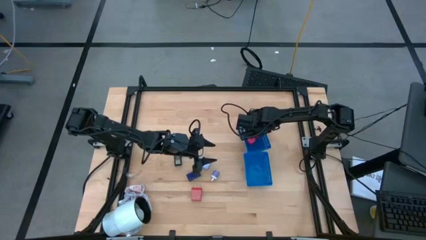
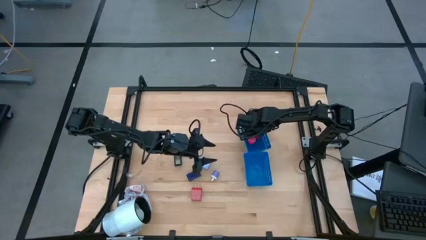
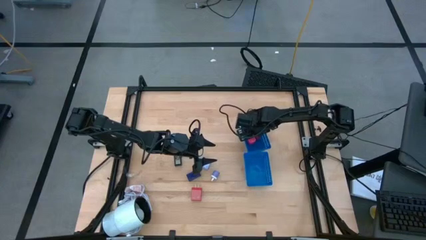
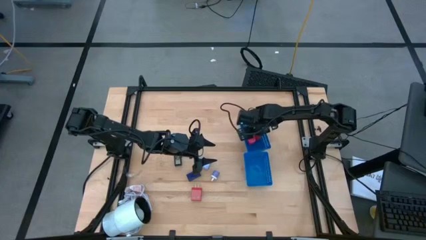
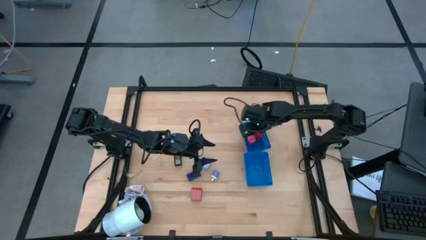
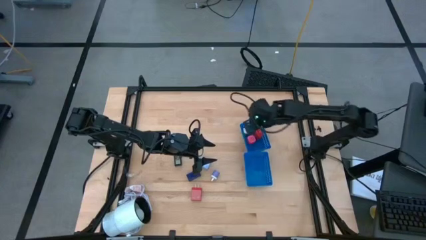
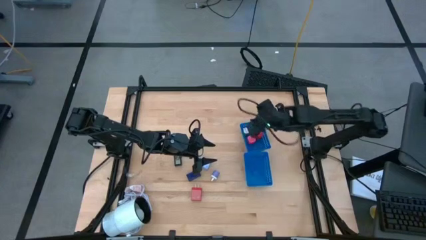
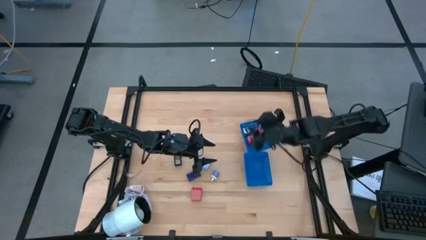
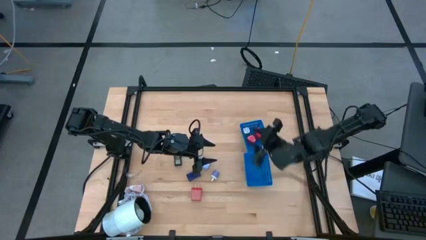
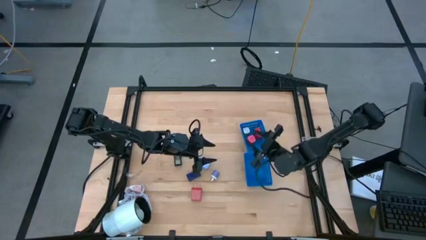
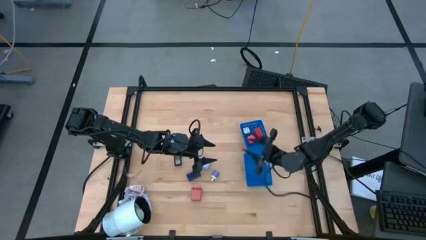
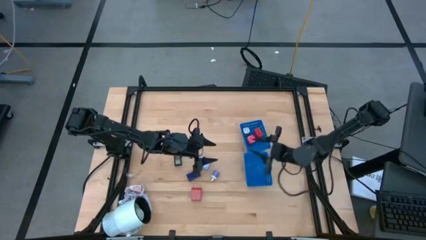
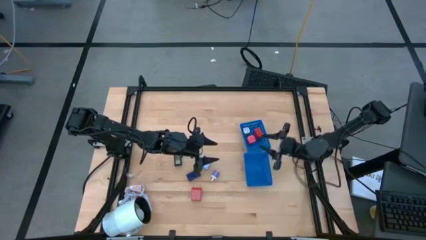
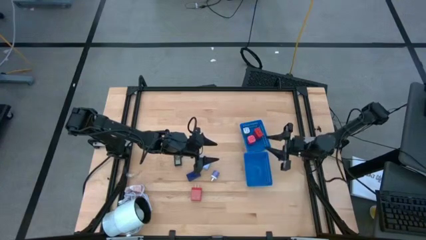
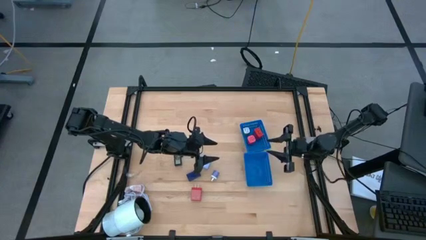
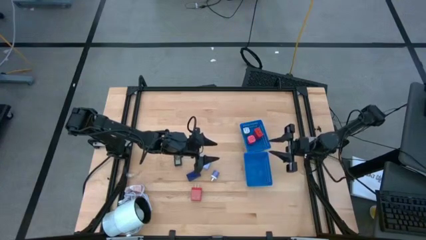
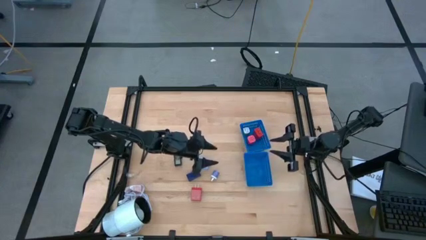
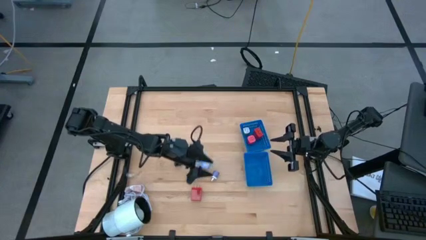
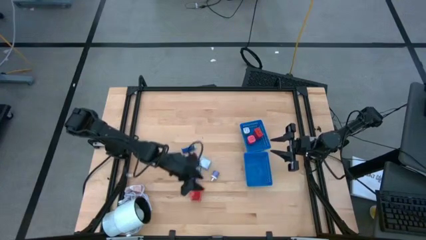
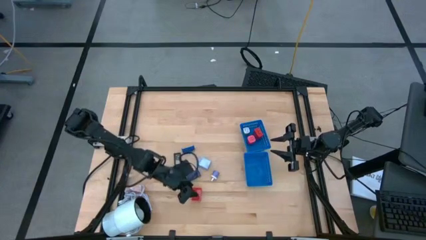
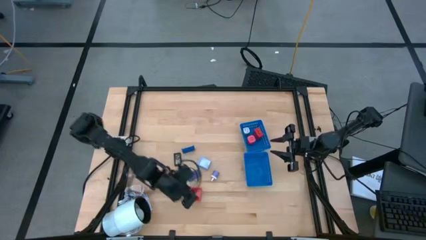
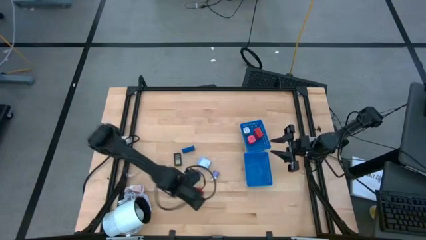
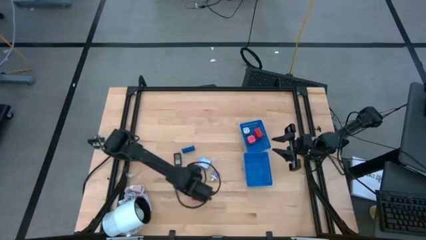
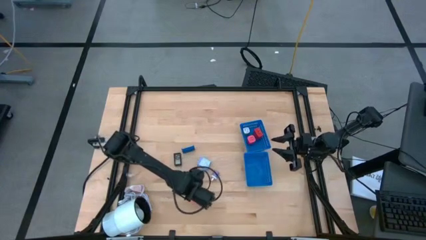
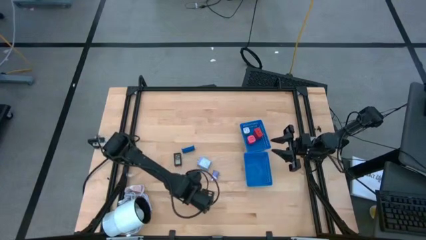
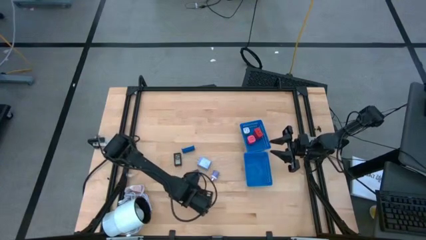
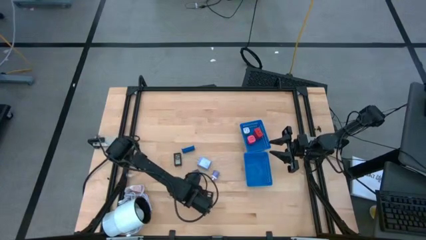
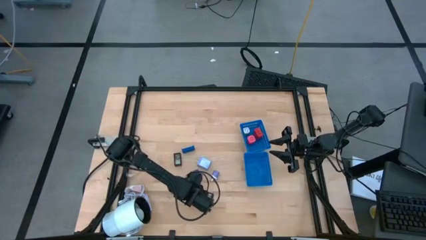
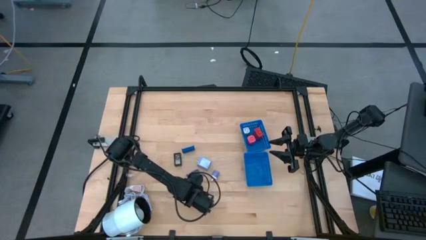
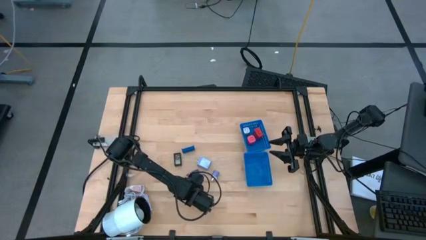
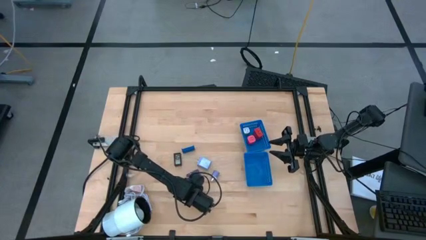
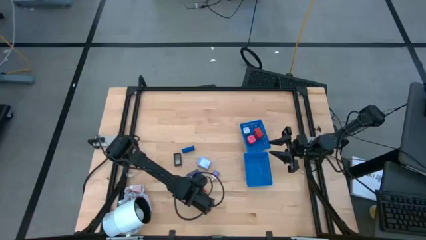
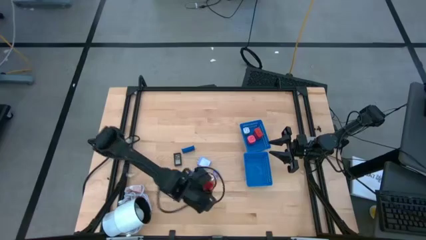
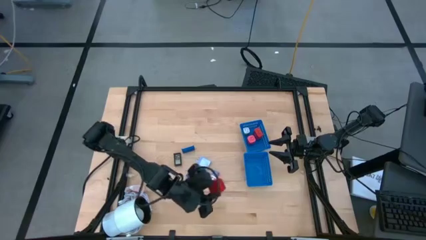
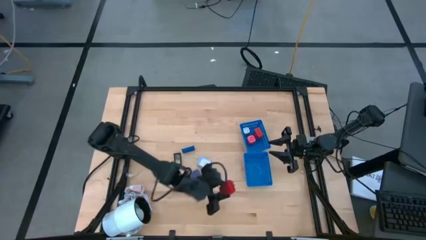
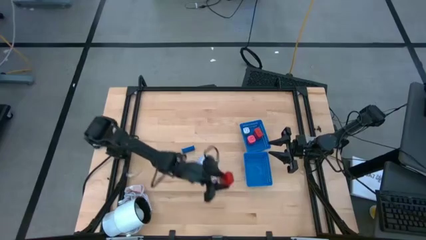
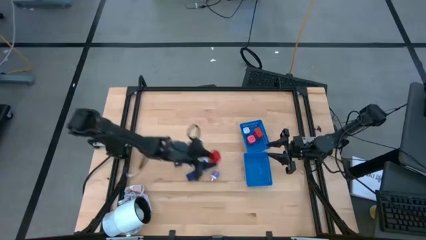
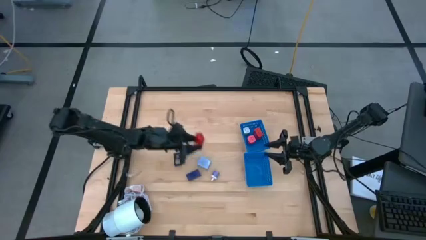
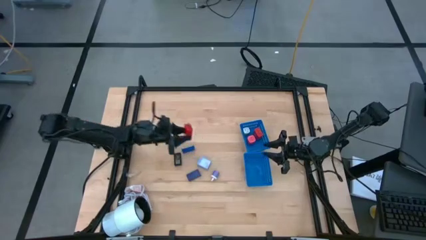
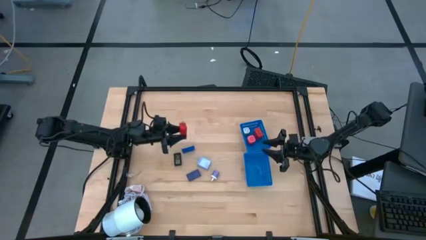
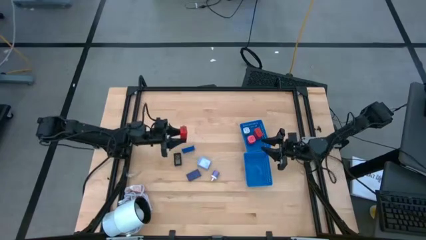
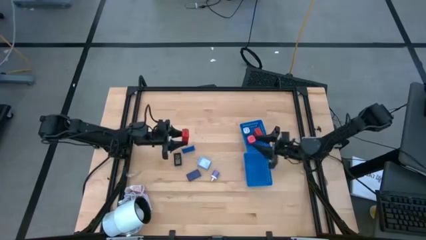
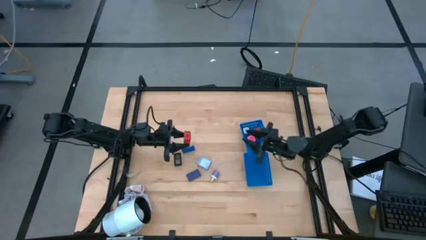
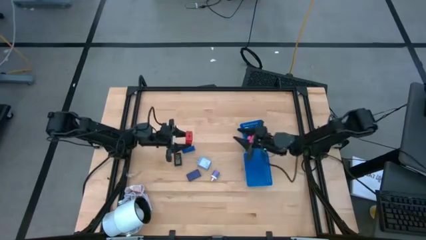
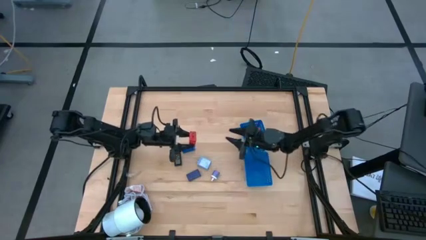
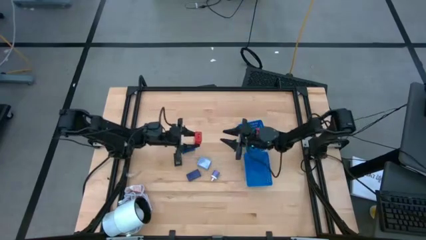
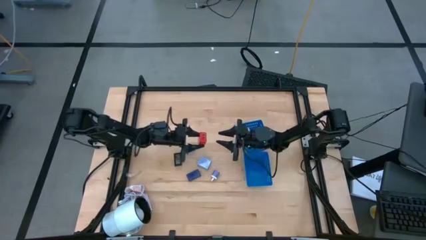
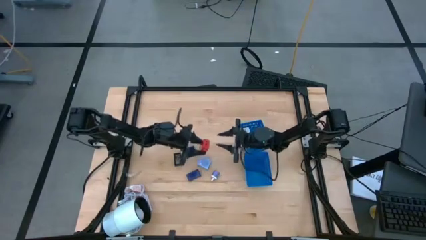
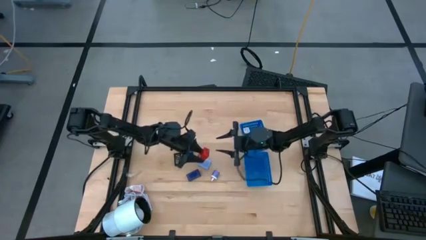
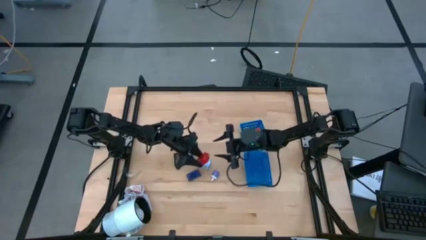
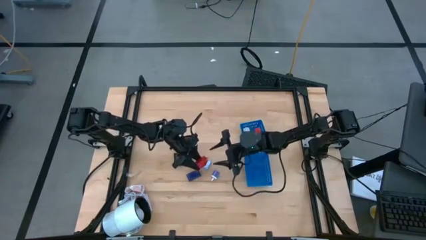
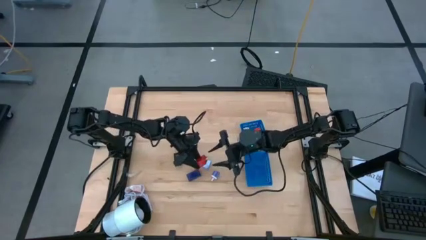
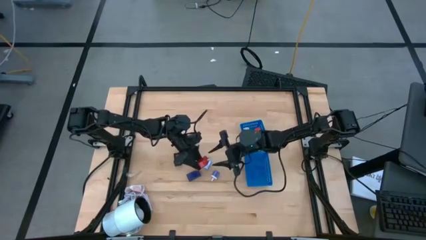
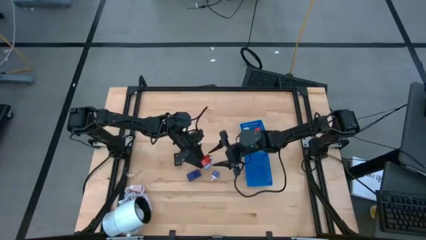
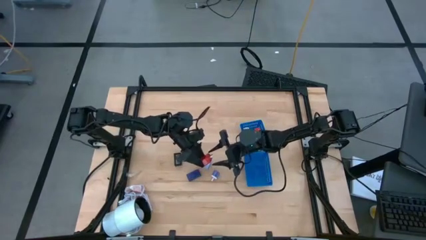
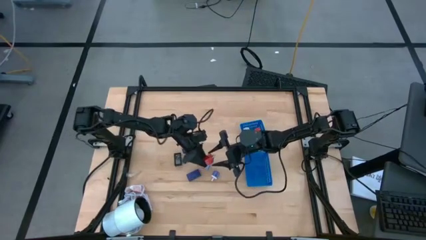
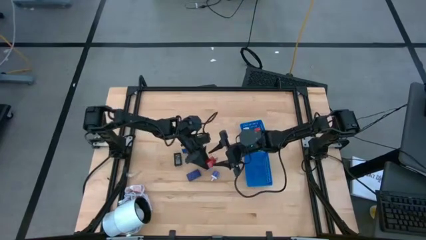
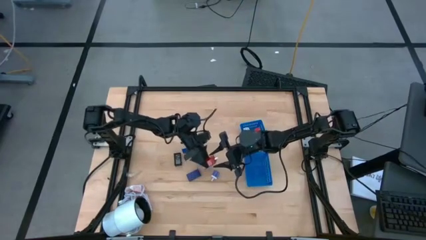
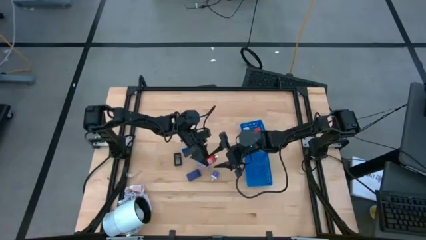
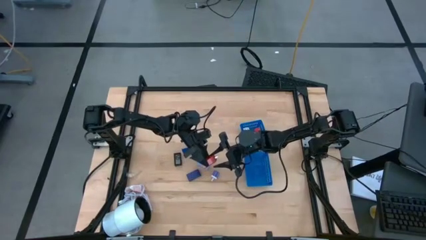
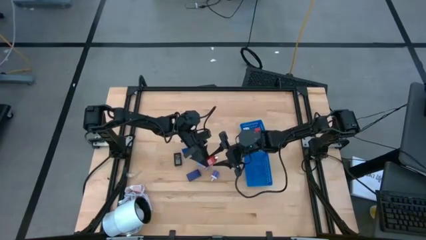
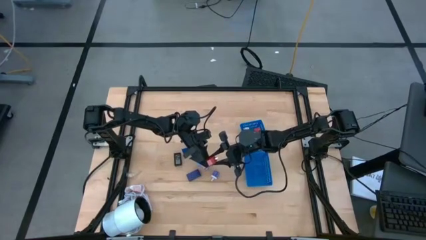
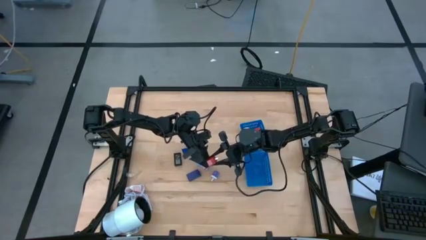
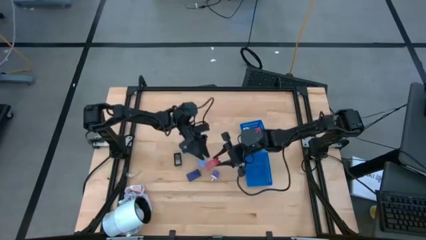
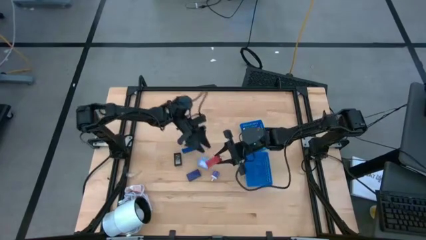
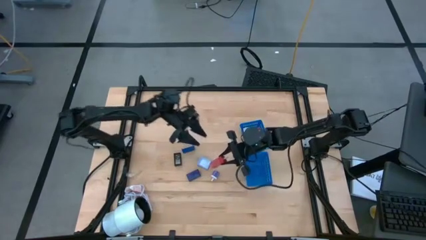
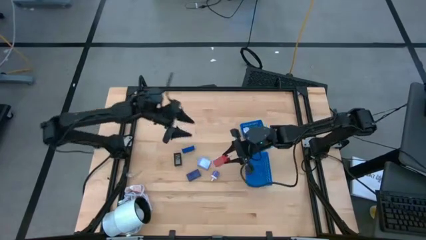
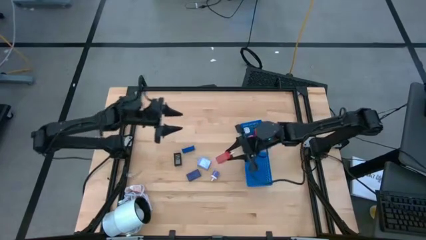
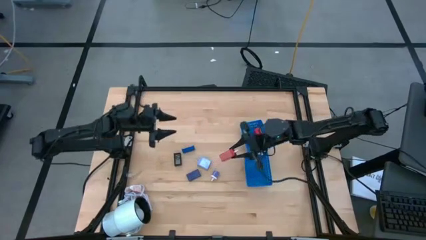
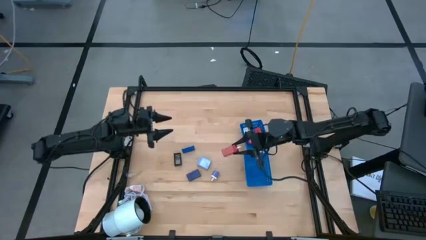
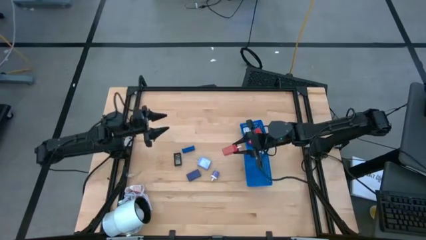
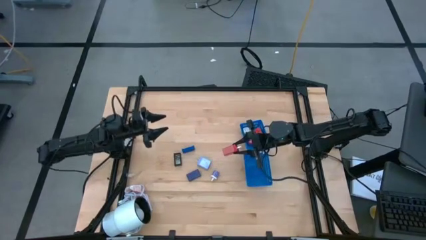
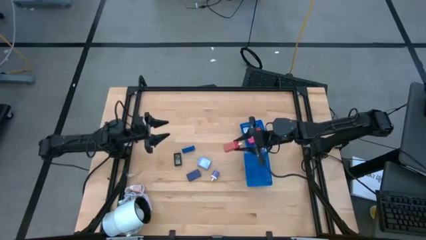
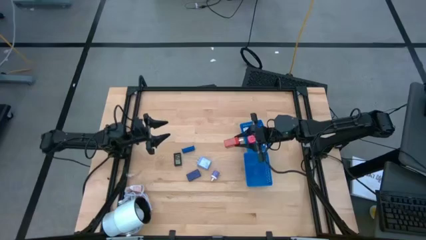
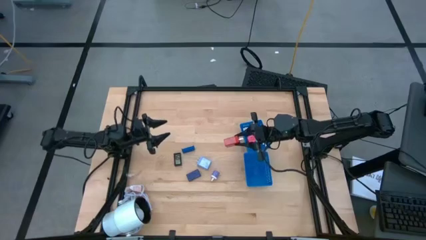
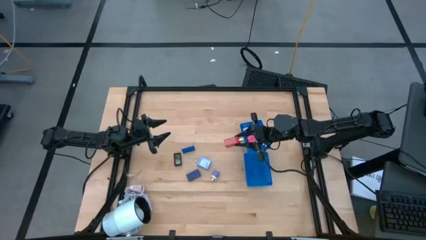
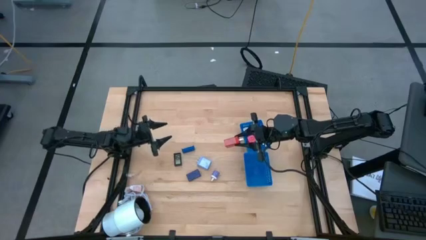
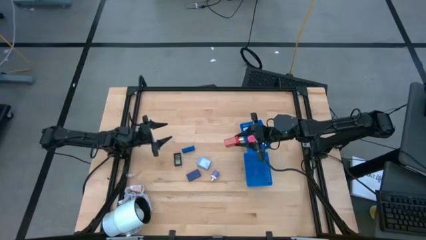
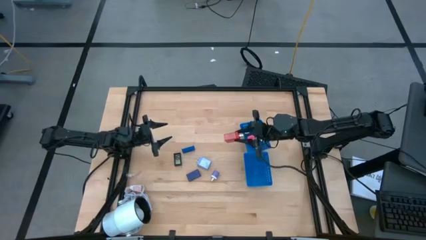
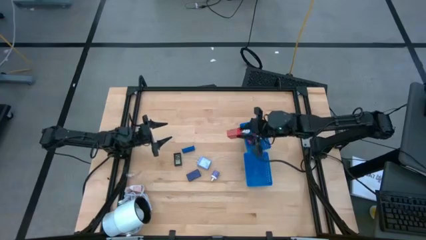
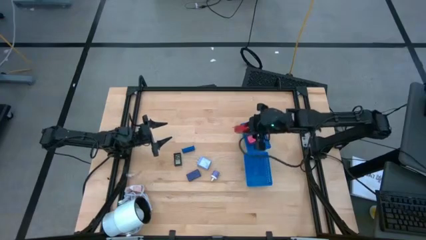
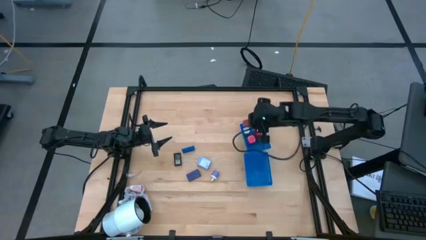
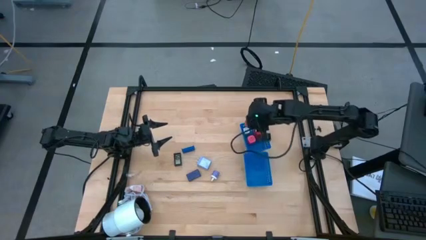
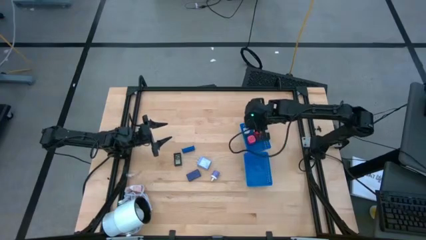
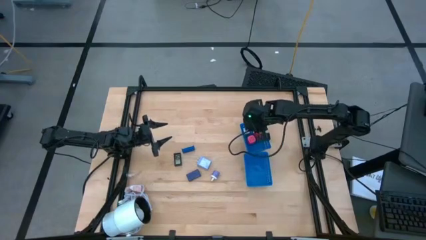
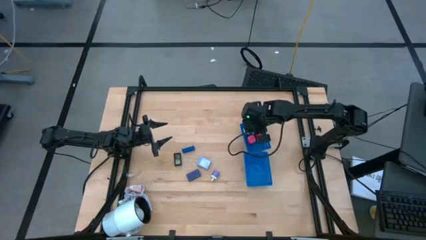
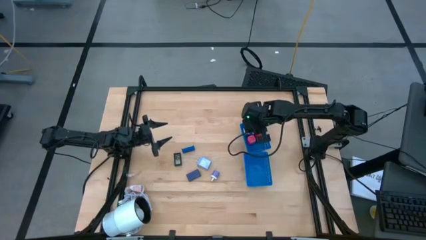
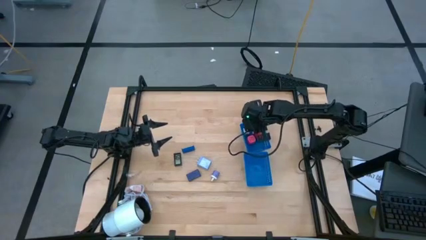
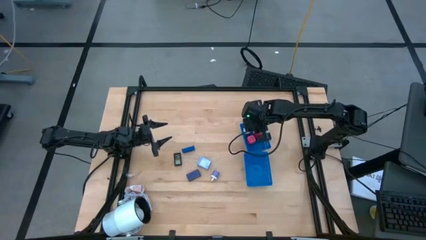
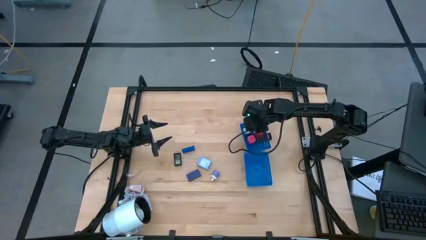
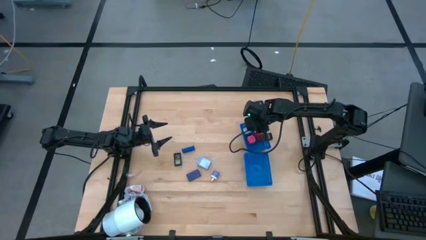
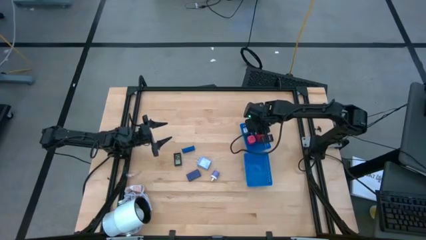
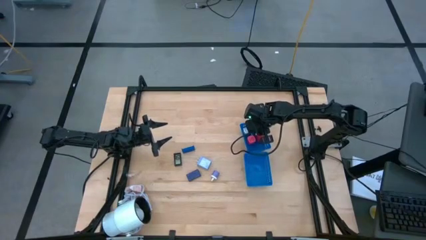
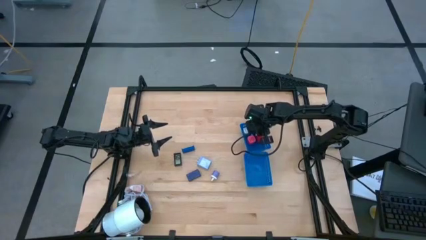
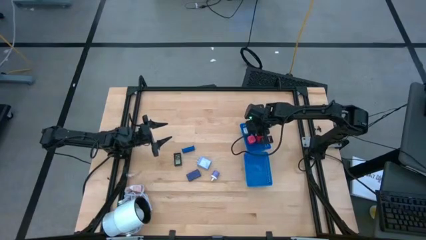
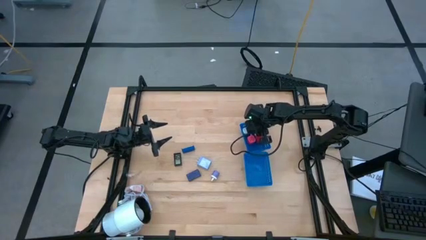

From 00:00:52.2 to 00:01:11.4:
Task: Pick & Place Office items
Put the red charger adapter into the top blue bin
